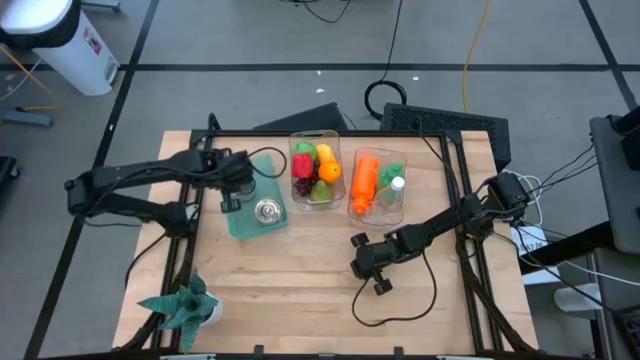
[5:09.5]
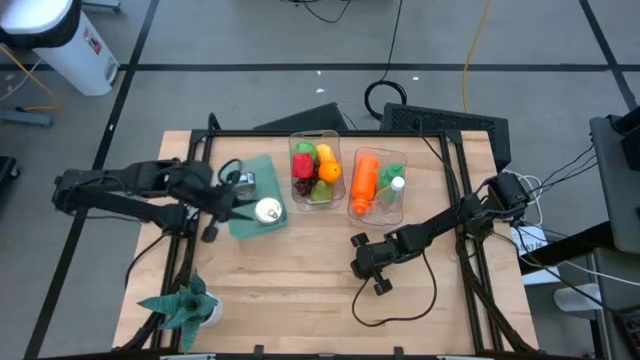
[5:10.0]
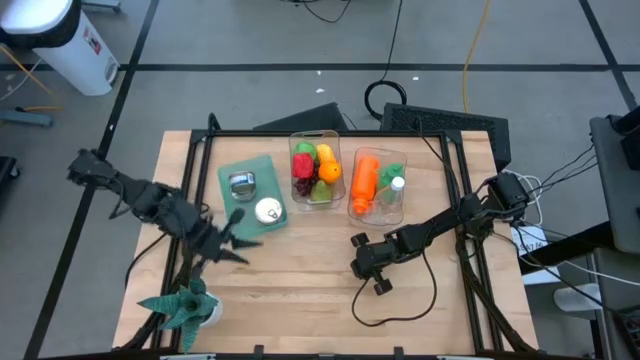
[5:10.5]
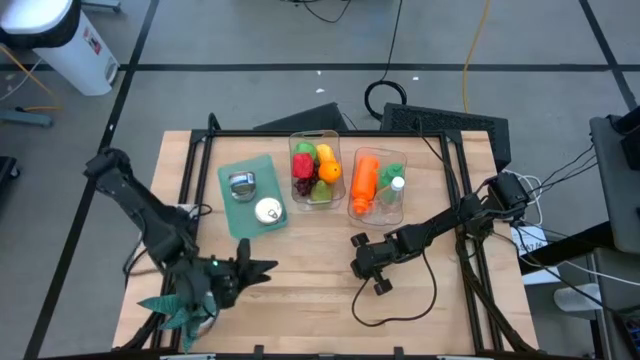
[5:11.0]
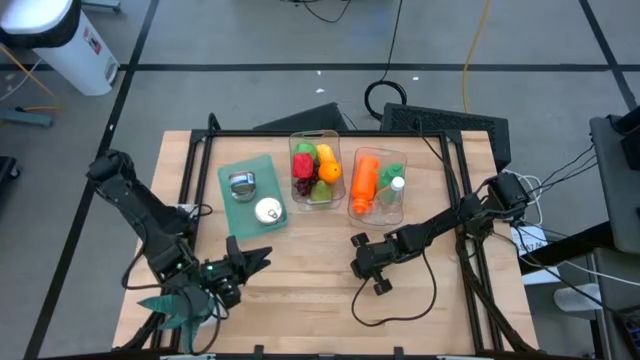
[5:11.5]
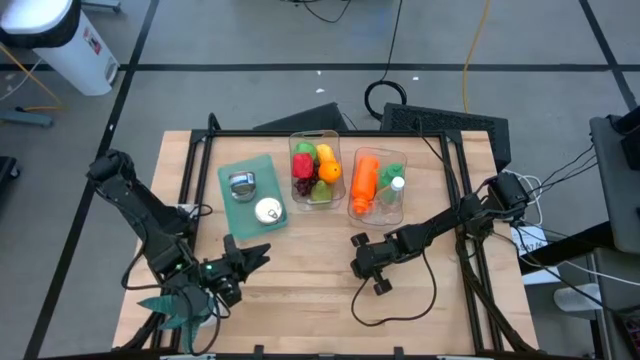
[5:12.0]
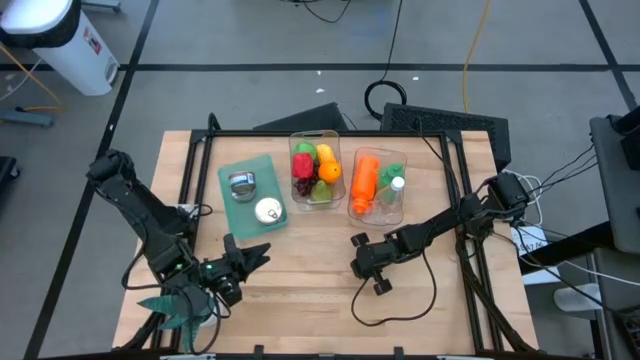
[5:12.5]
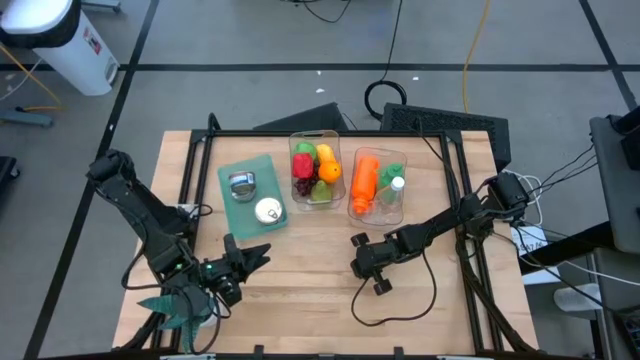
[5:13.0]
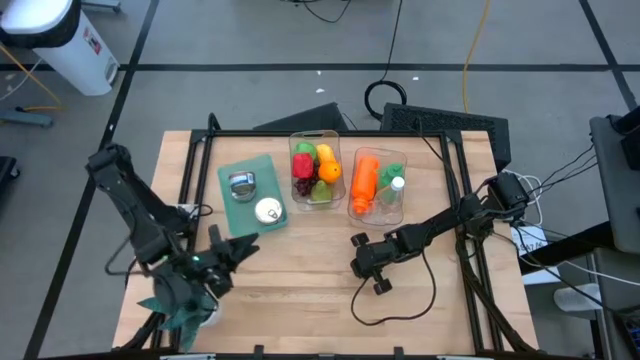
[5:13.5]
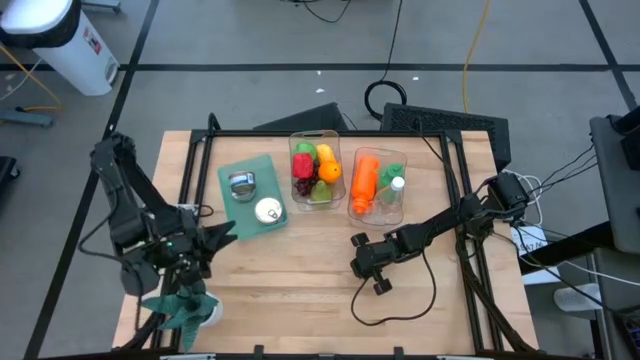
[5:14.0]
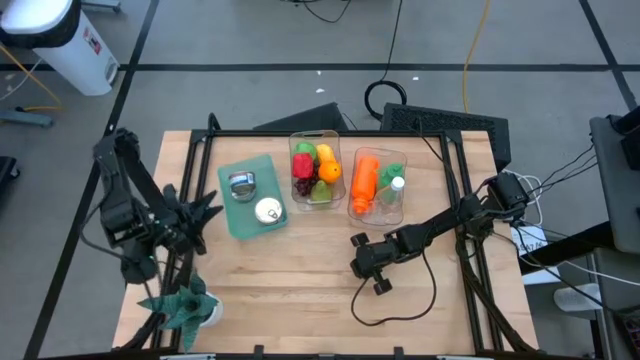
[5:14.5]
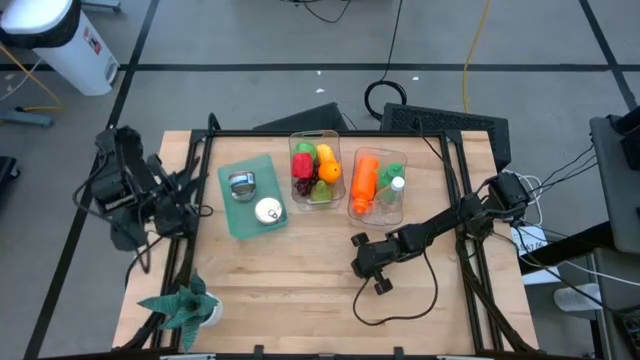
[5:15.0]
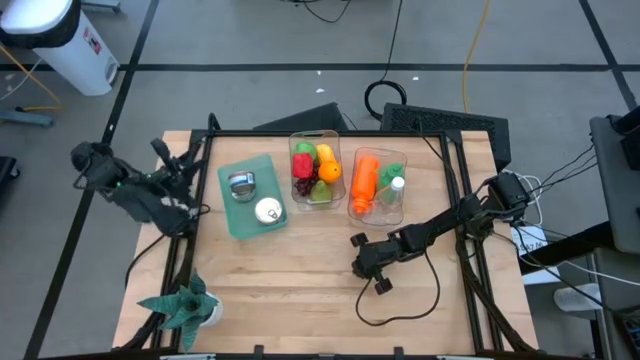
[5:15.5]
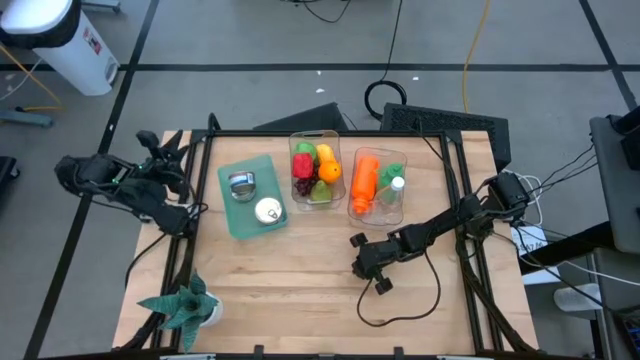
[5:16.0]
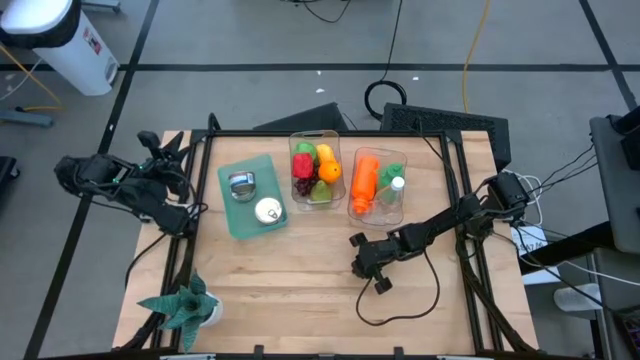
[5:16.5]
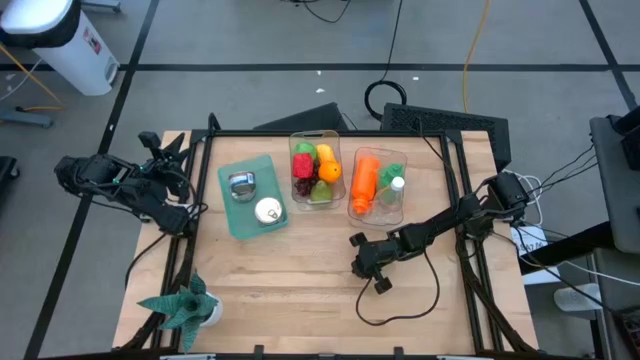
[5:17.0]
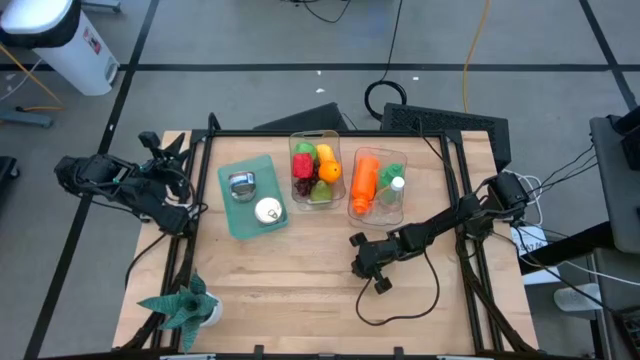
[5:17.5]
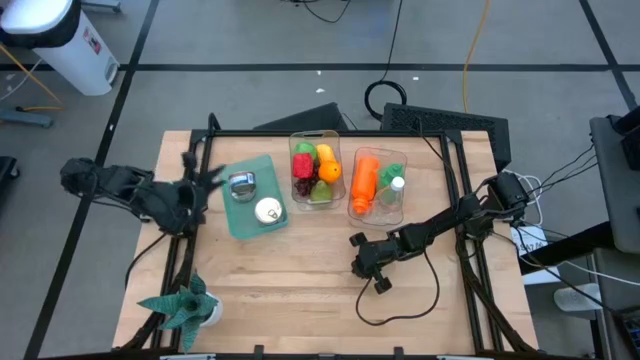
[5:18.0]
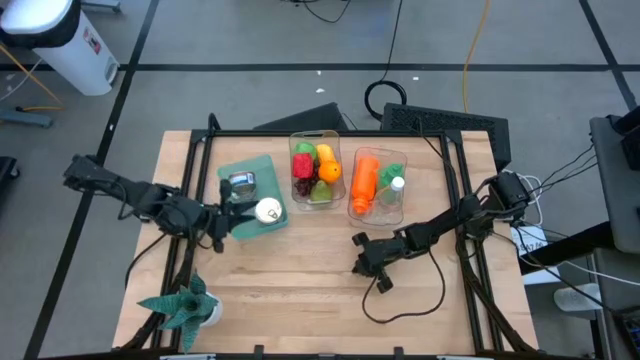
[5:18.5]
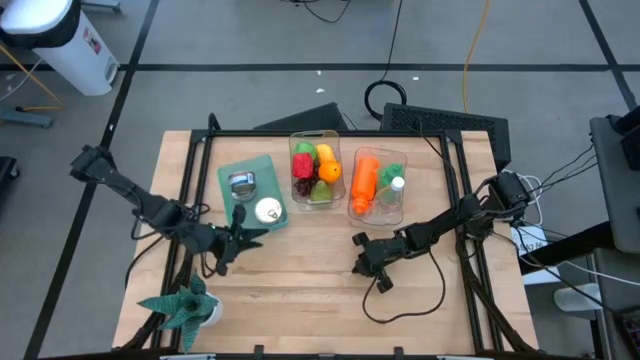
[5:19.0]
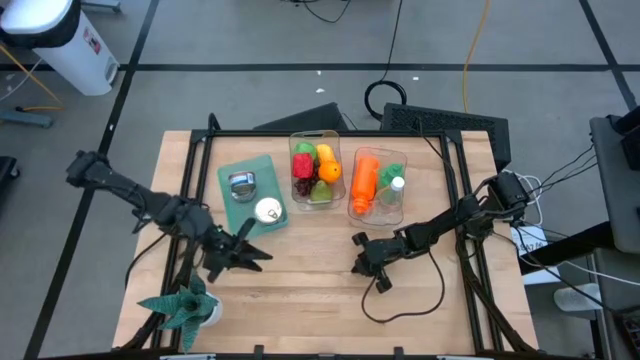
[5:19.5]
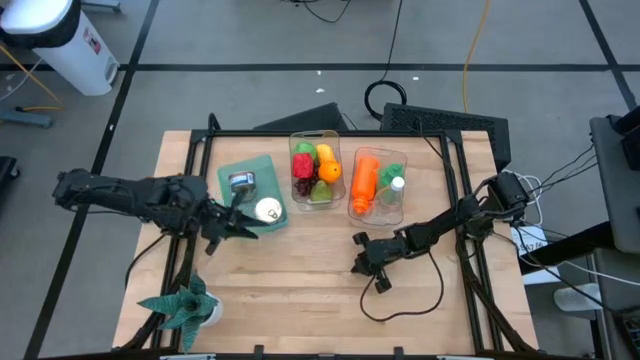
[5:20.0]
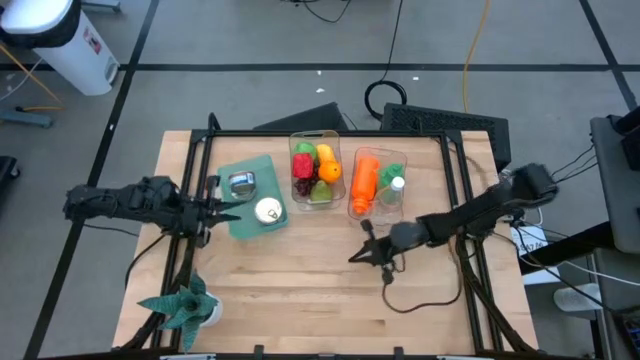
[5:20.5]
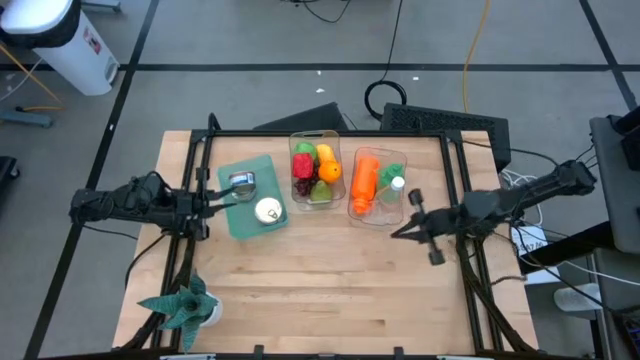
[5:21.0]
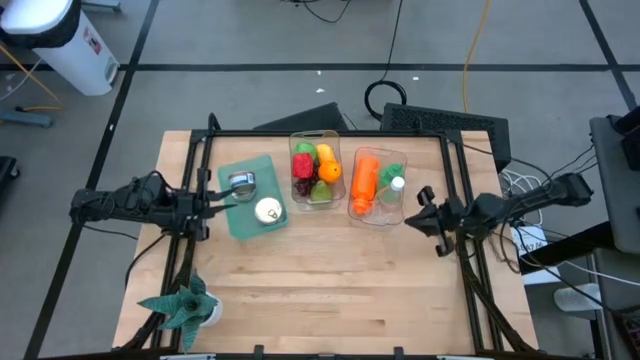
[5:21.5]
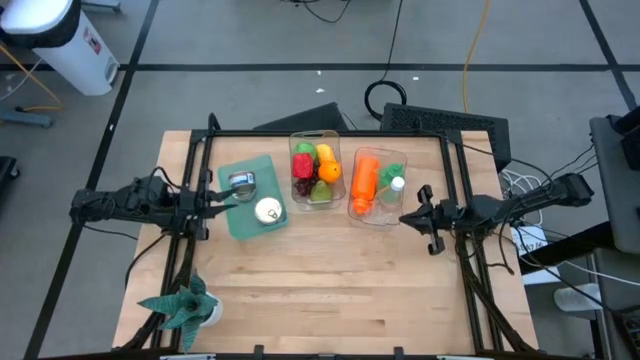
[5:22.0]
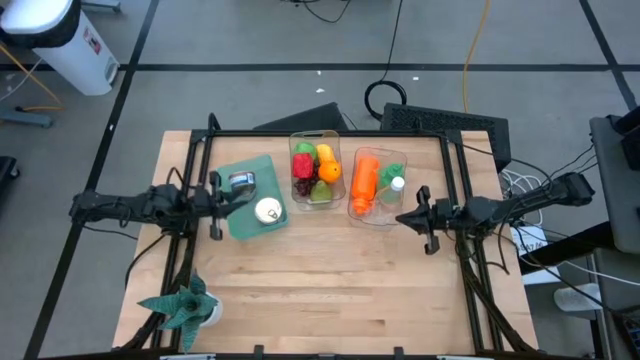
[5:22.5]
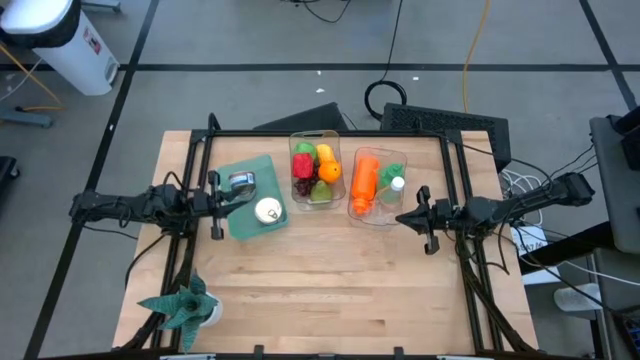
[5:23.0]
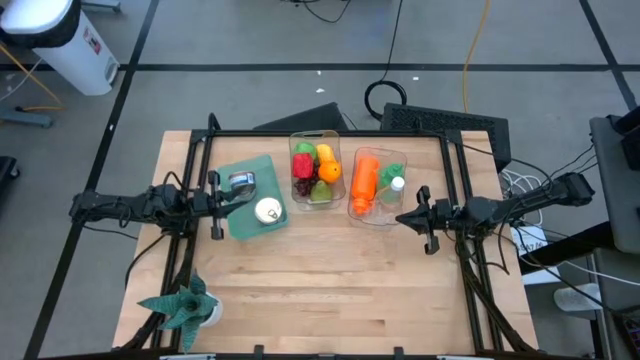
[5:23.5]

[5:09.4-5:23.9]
Task: Pick & Place Food Item
Return to Home Position

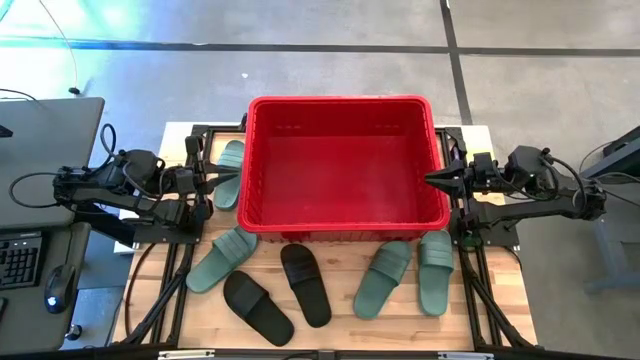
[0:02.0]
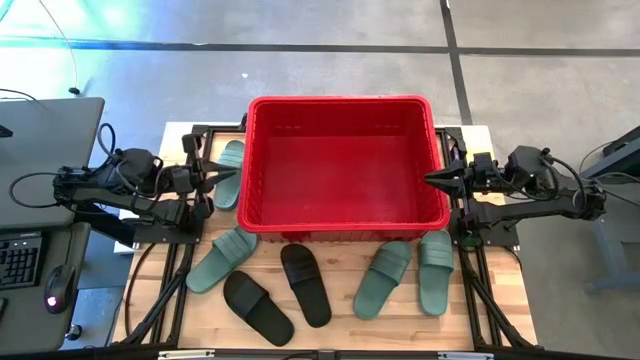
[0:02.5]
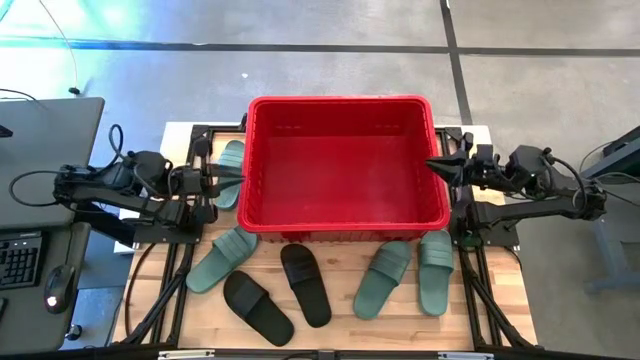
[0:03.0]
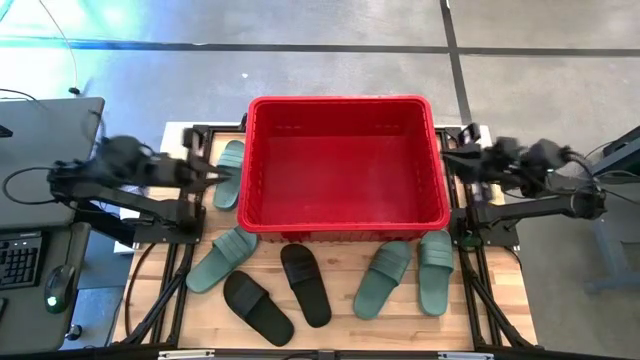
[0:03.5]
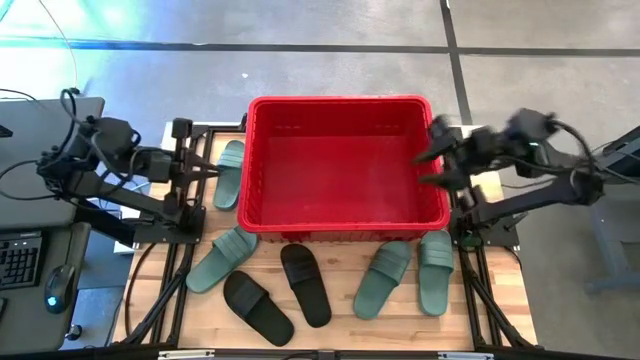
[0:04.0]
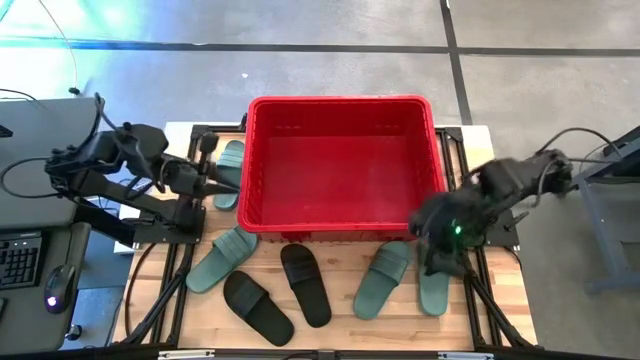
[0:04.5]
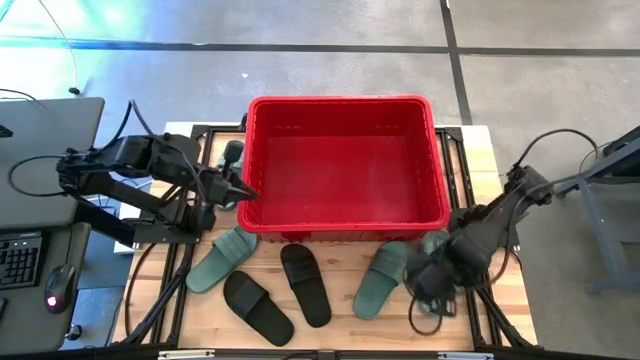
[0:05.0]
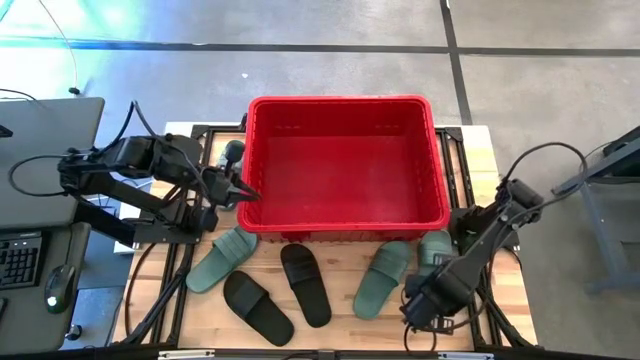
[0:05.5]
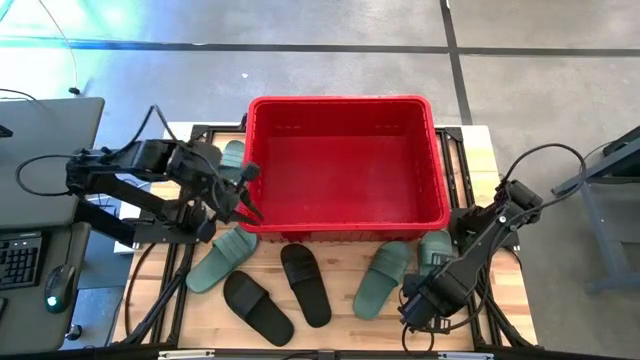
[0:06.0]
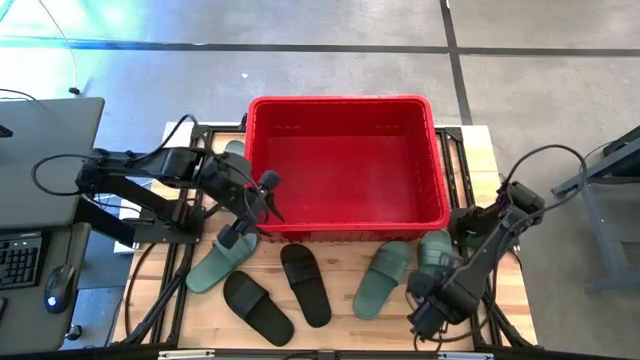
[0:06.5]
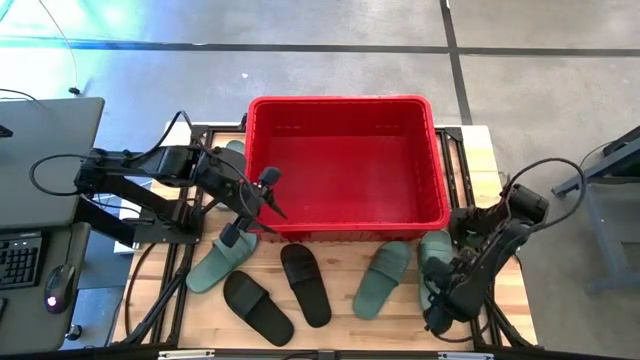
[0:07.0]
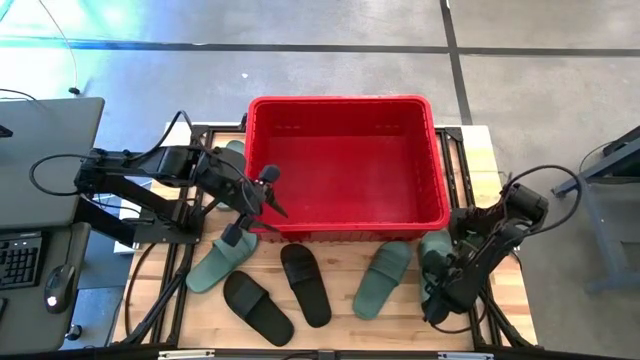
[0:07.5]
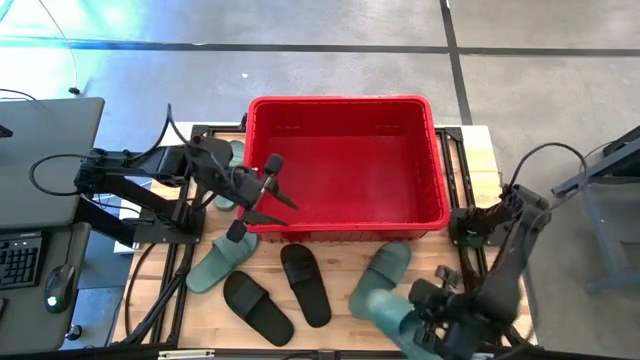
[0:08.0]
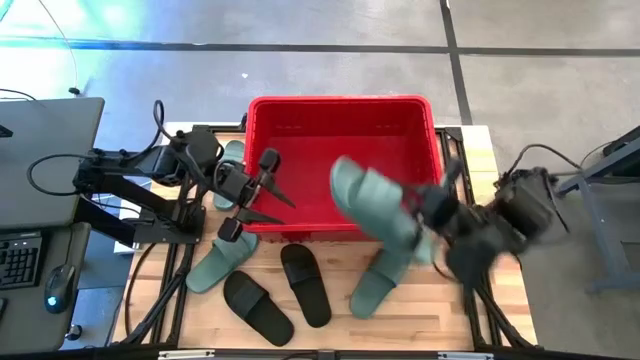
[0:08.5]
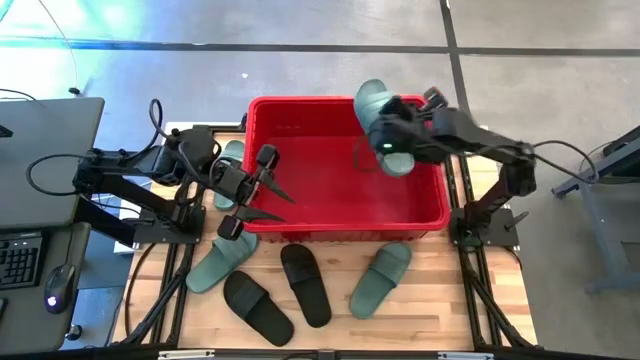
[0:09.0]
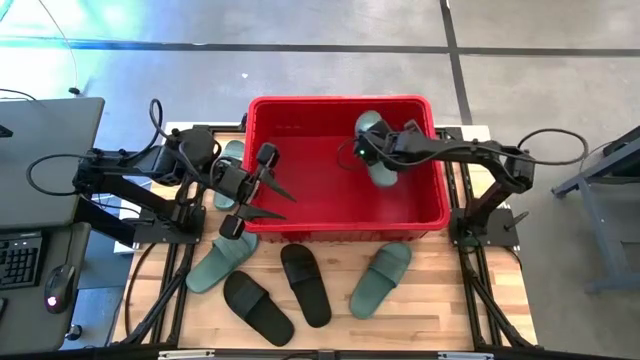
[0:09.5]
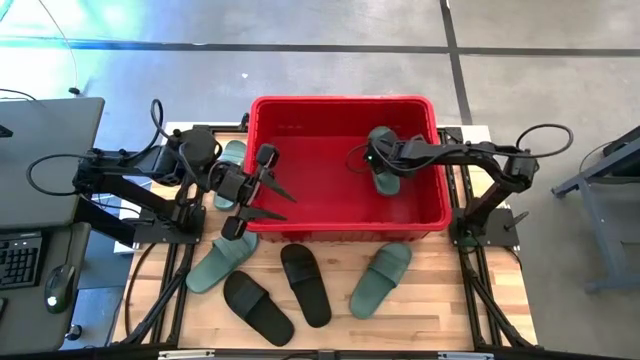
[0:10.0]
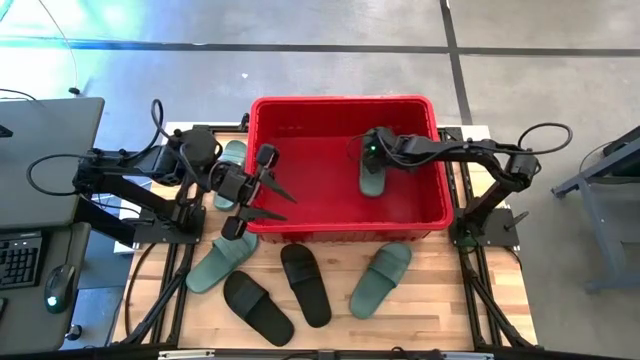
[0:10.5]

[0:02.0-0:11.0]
Task: Pick and place slides into bin
Put the green slide into the red bin
